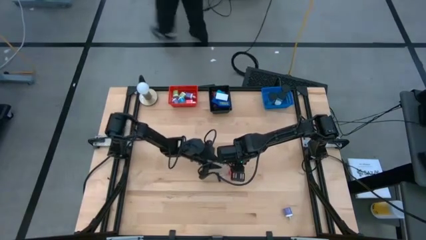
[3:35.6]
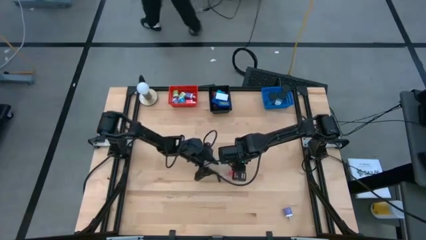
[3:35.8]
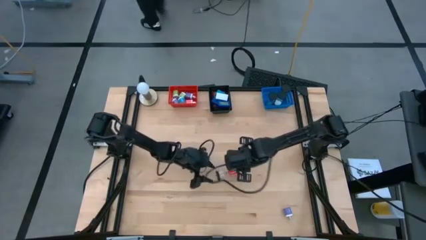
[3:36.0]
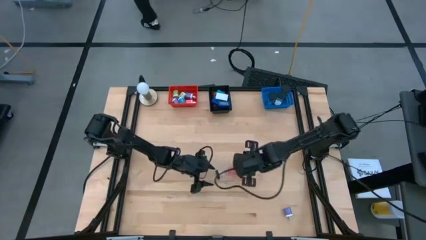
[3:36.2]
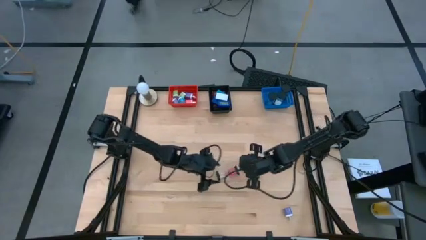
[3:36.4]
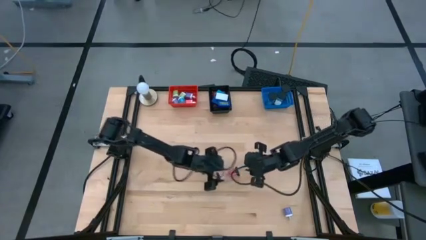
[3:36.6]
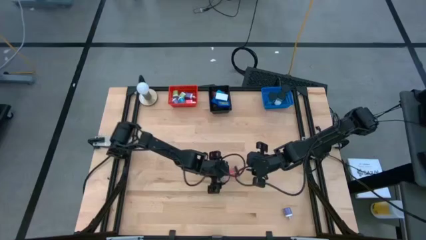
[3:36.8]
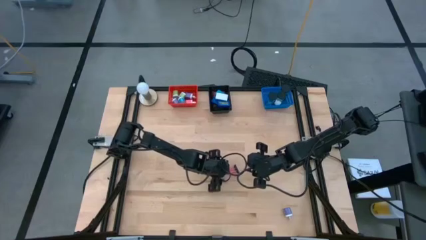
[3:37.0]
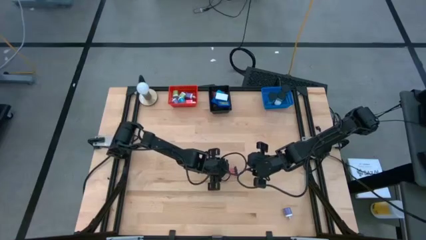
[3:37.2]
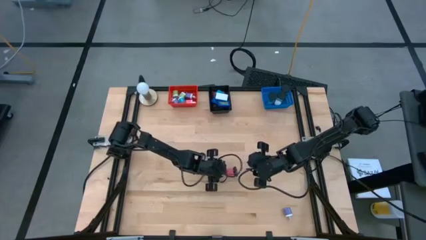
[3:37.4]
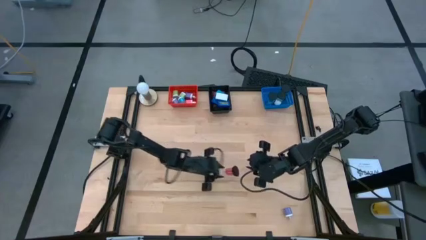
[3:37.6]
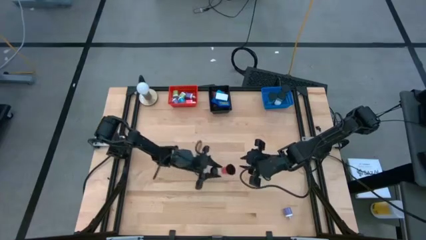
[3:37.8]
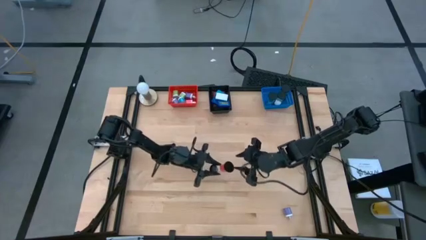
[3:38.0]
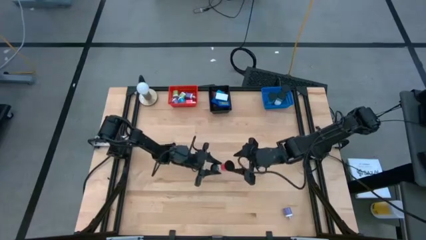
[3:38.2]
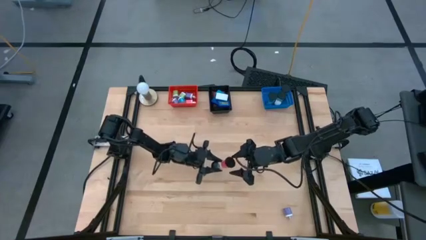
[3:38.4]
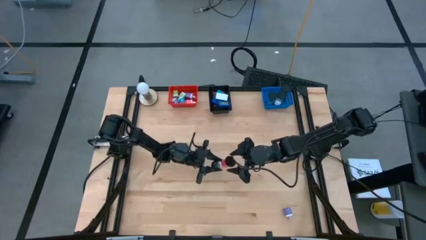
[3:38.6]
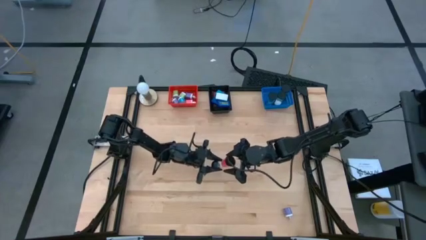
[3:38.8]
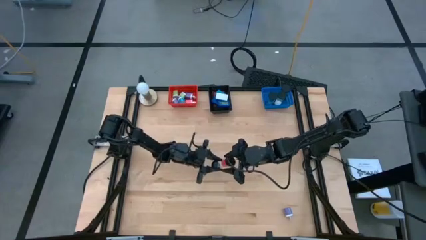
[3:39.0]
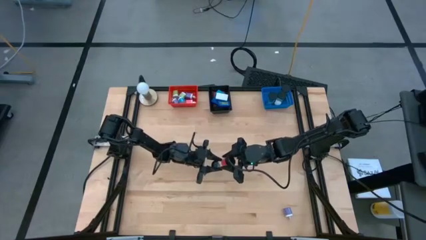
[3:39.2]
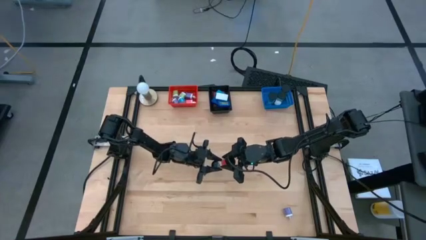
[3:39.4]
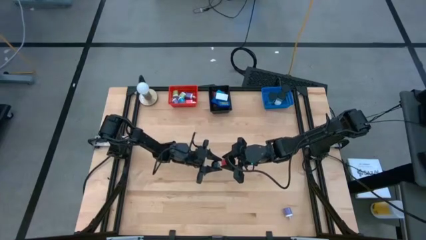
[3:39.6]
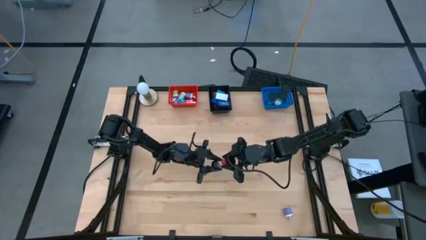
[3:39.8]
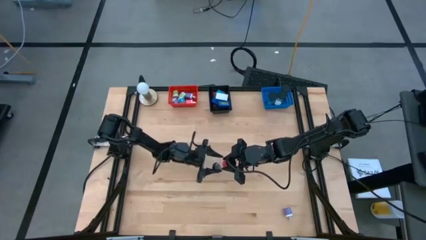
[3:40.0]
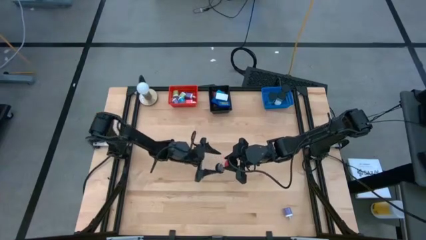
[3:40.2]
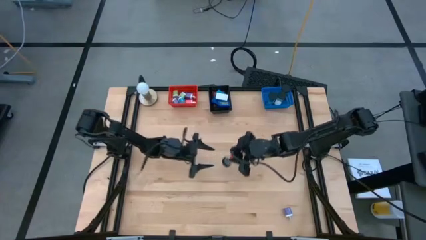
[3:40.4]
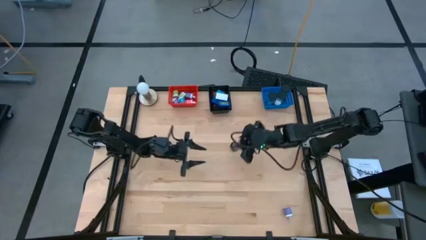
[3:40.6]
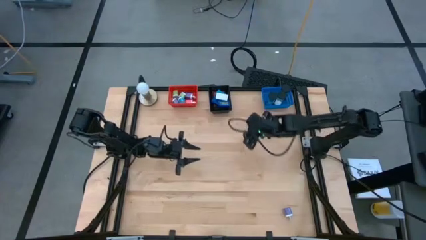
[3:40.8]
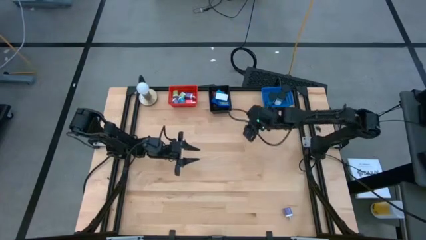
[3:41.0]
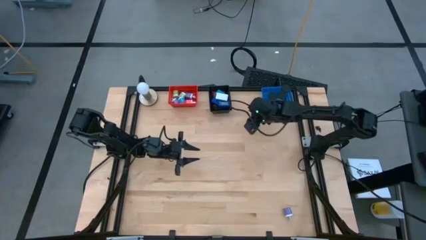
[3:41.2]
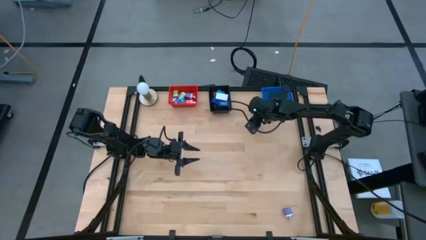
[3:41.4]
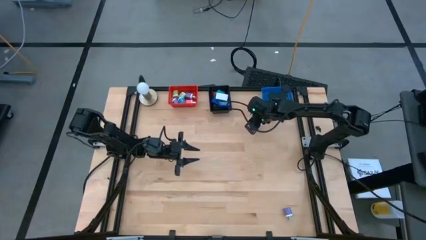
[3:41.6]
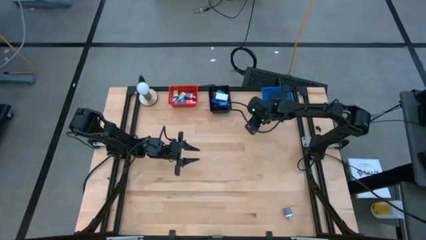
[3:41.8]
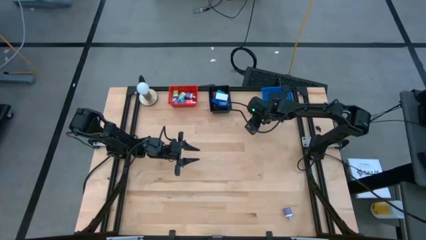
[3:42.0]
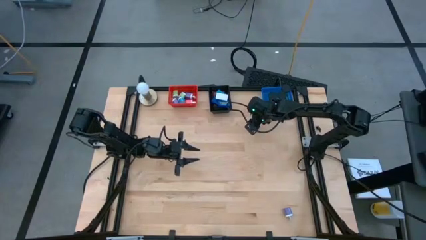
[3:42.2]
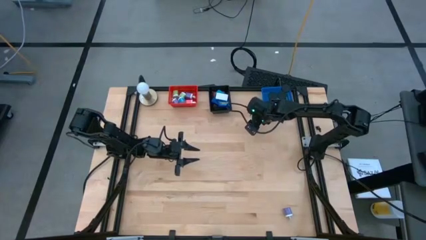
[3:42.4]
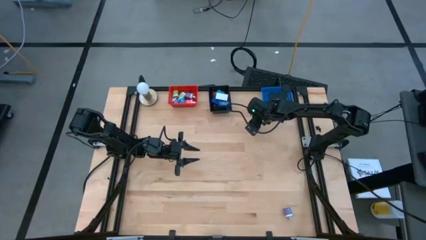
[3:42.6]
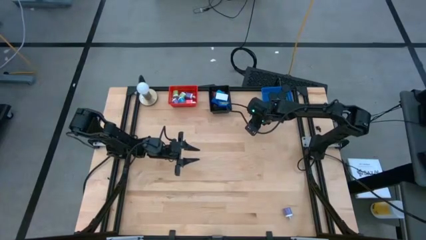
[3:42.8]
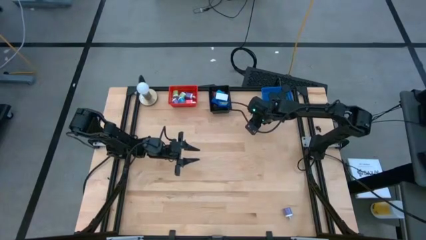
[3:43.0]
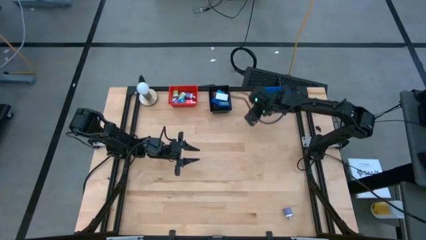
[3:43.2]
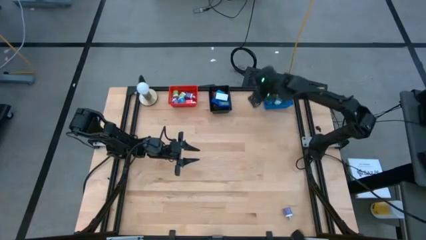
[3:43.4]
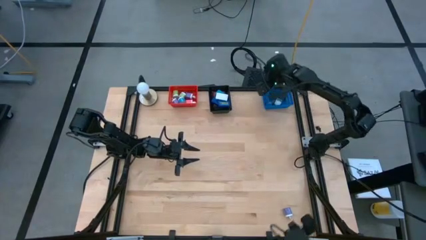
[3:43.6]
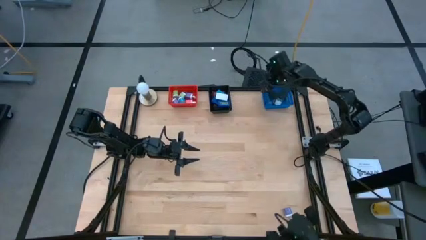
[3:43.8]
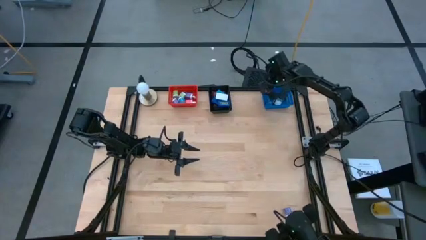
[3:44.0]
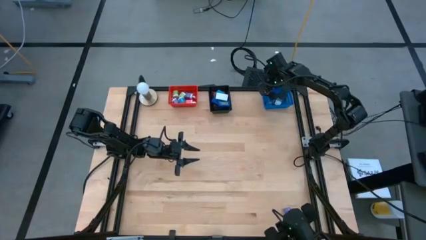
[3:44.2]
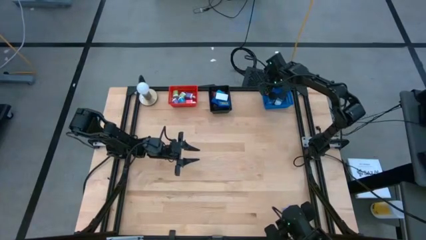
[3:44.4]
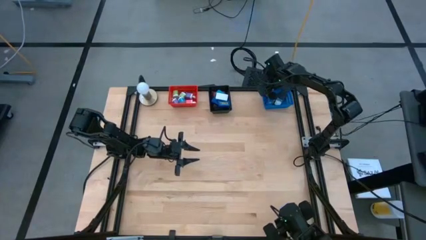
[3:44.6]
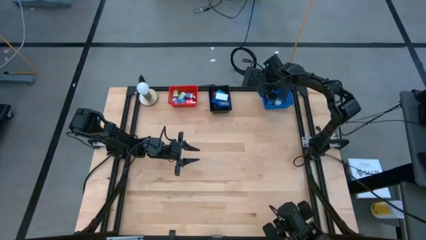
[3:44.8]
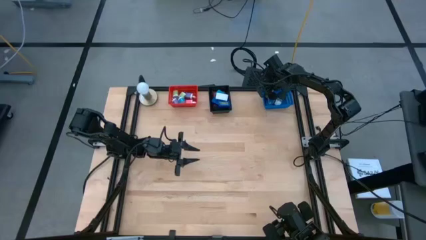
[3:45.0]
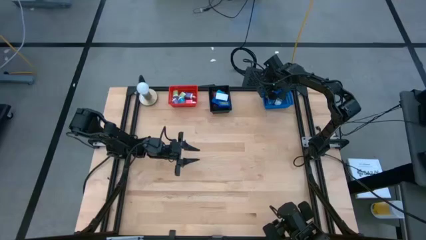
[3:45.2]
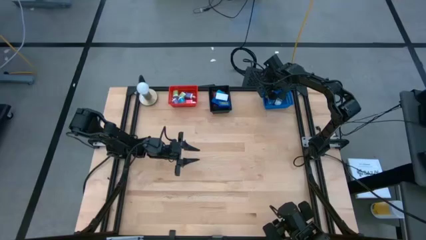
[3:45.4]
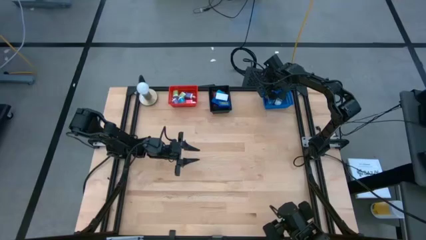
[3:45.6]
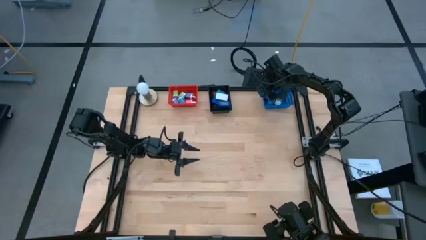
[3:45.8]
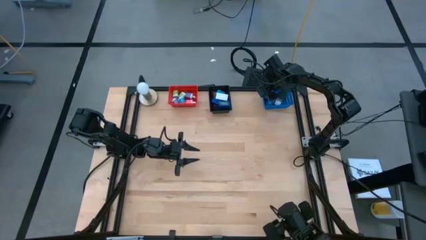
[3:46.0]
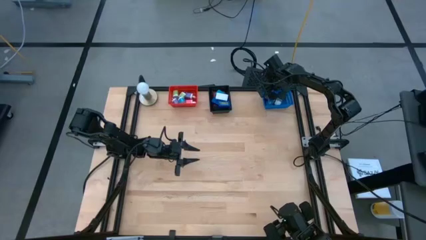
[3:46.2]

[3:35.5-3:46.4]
Task: Pick & Place Office items
Put the pink hourglass into the blue bin

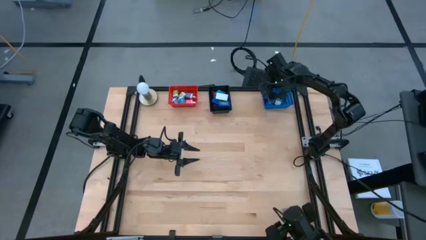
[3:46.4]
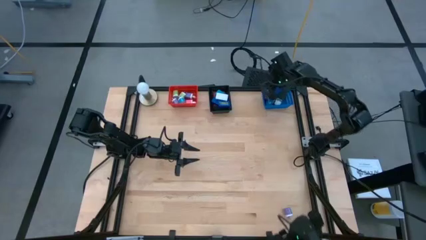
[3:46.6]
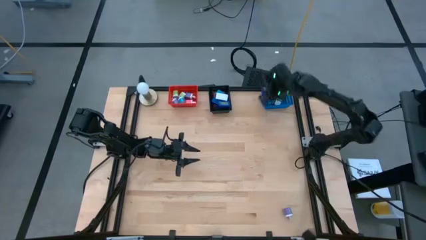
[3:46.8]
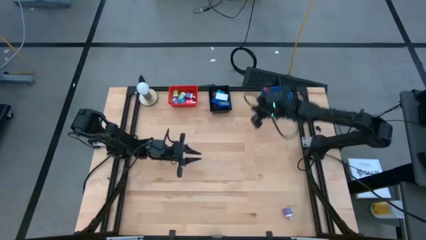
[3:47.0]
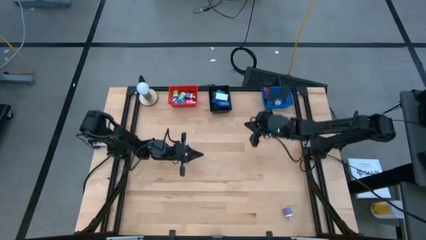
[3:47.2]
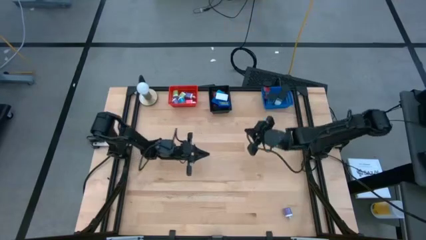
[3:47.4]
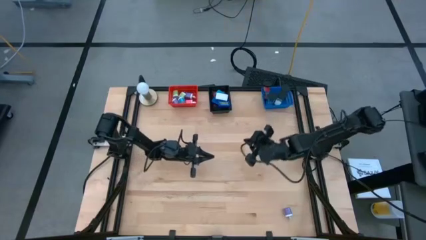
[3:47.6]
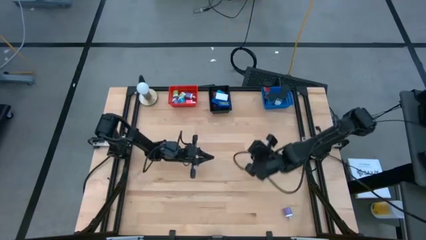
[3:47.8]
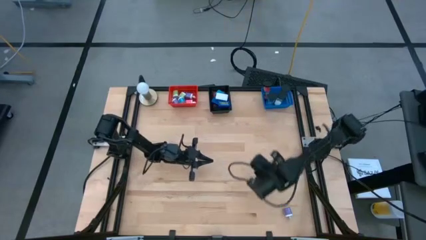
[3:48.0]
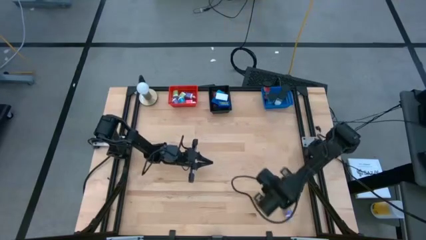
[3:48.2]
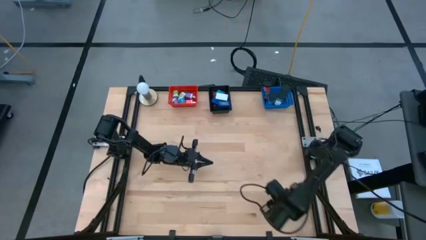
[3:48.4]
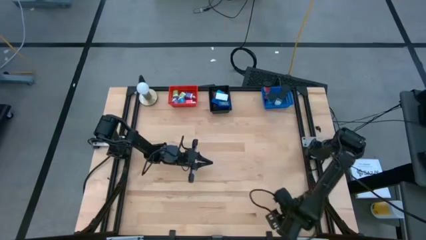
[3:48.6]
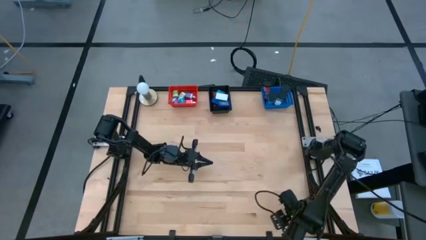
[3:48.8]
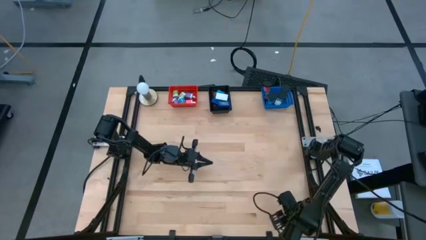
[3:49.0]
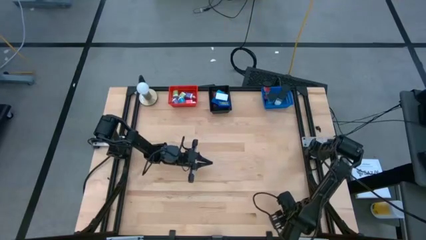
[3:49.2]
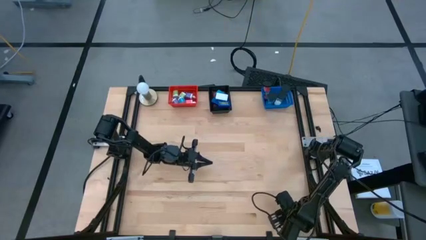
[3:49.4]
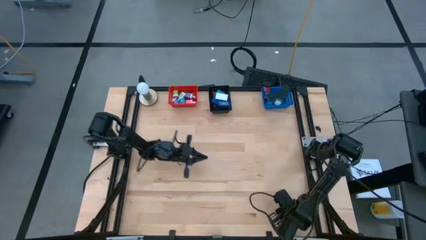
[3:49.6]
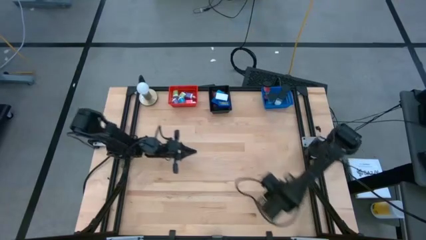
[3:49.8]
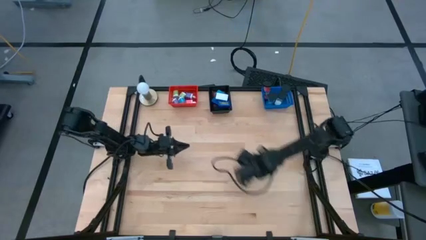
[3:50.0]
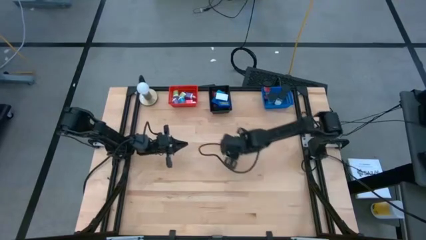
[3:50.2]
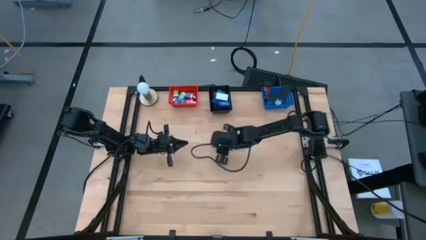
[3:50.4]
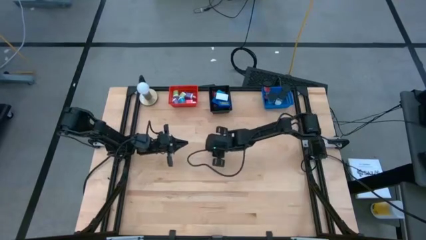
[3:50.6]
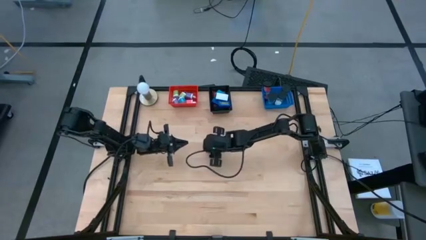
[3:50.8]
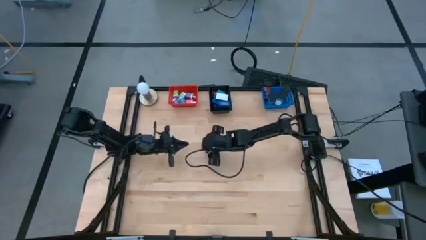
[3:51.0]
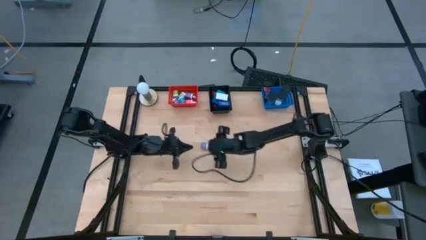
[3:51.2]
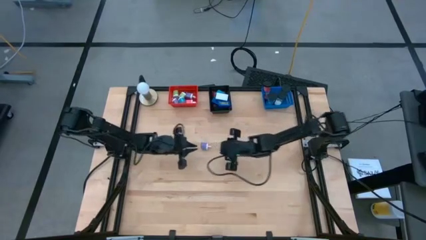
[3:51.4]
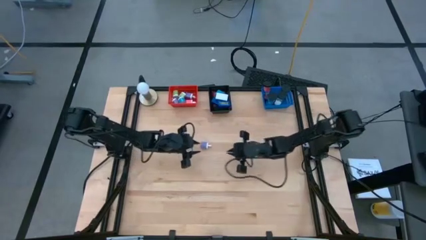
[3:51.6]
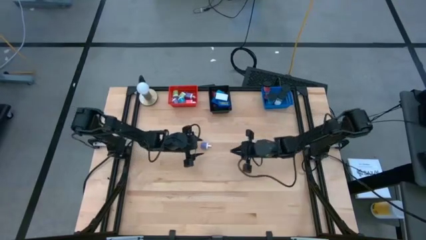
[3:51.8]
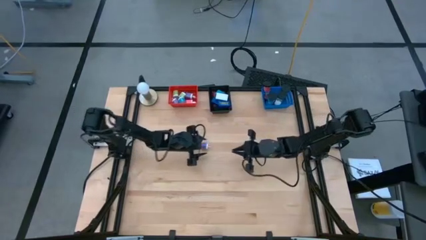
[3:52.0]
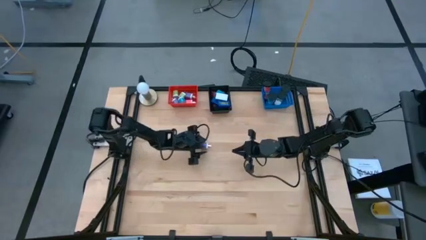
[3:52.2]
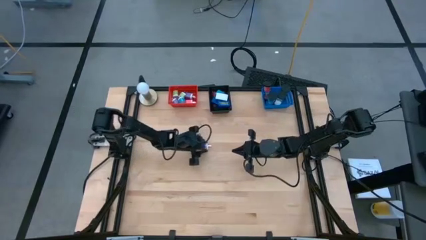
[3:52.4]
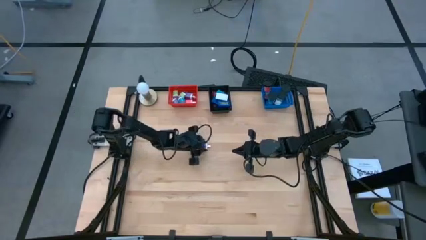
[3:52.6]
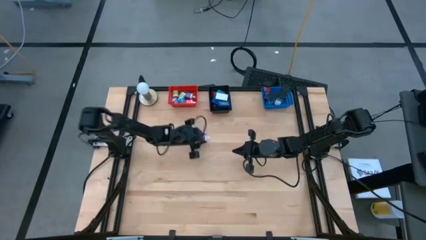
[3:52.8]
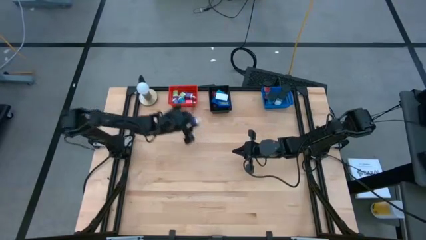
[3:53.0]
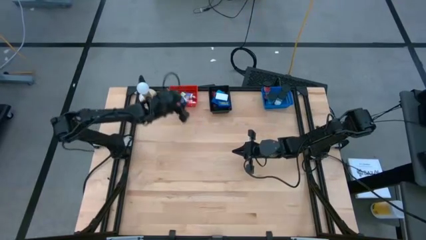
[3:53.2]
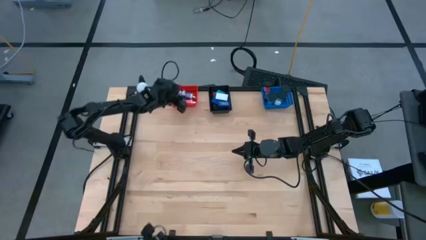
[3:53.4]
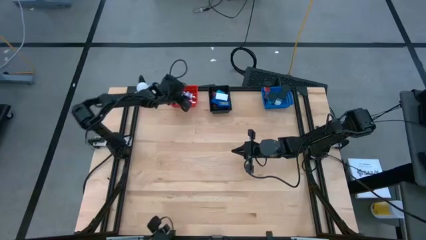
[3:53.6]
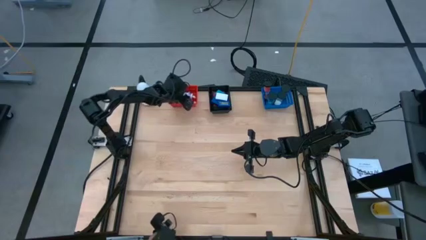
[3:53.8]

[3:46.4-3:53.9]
Put the purple charger adapter into the red bin
